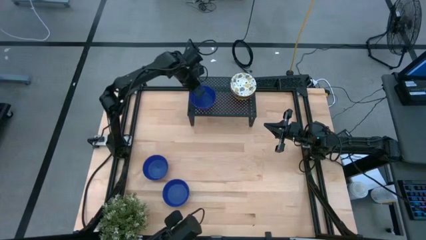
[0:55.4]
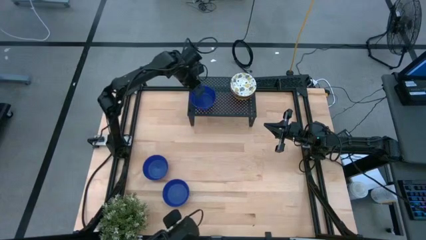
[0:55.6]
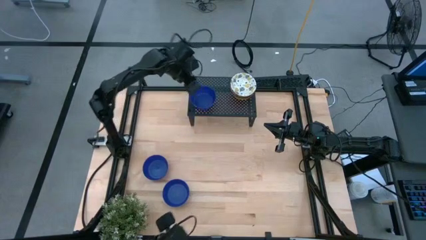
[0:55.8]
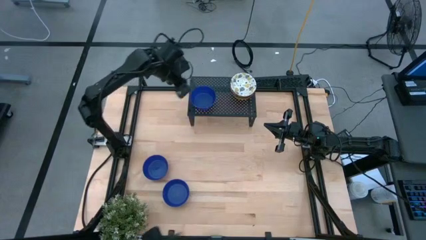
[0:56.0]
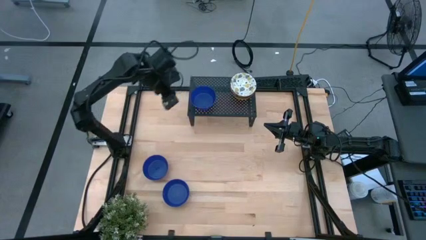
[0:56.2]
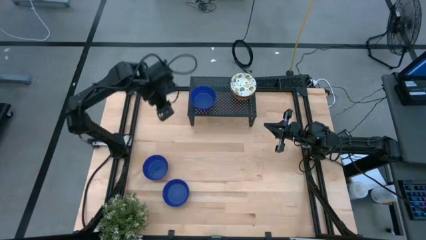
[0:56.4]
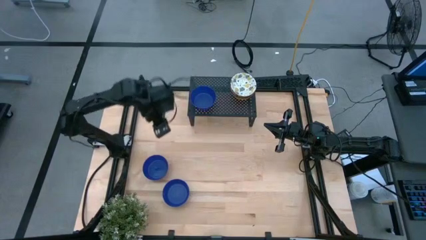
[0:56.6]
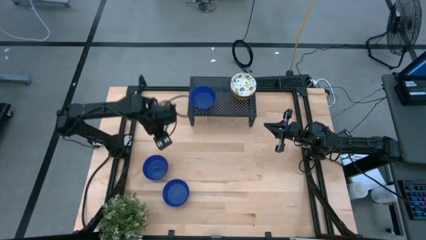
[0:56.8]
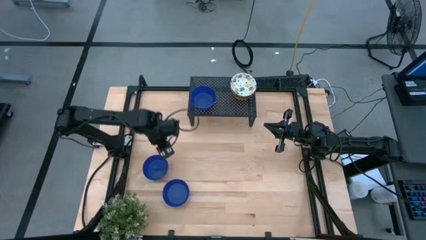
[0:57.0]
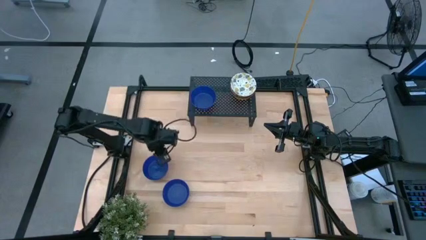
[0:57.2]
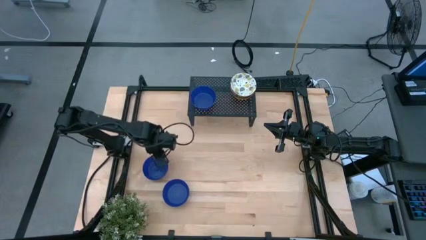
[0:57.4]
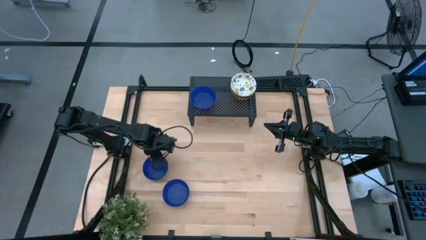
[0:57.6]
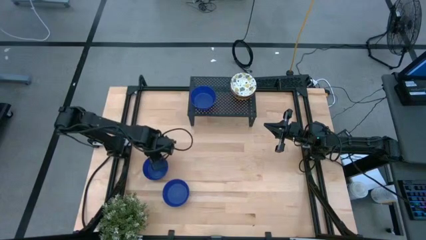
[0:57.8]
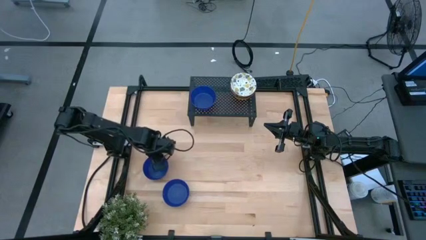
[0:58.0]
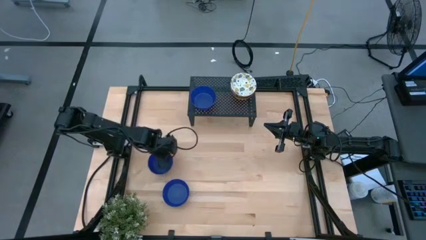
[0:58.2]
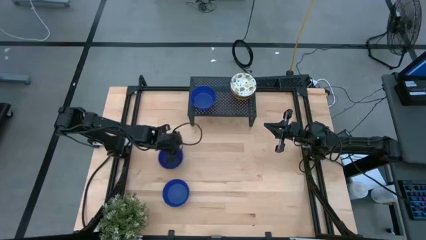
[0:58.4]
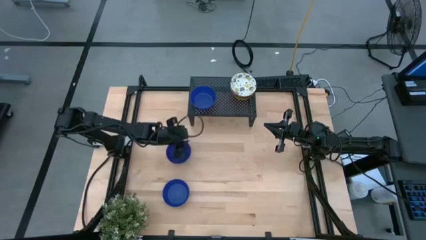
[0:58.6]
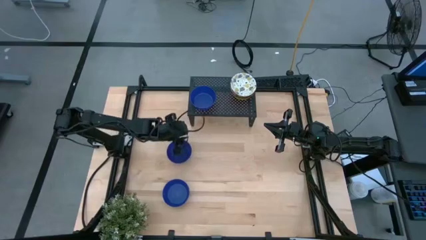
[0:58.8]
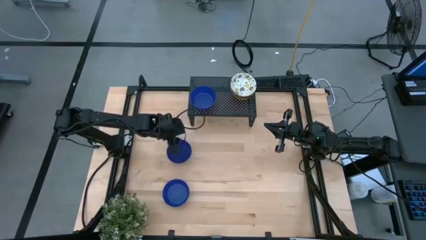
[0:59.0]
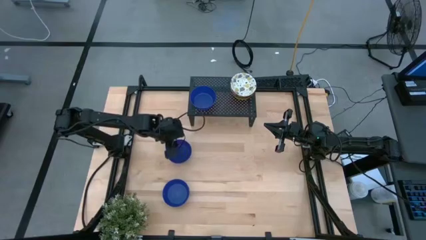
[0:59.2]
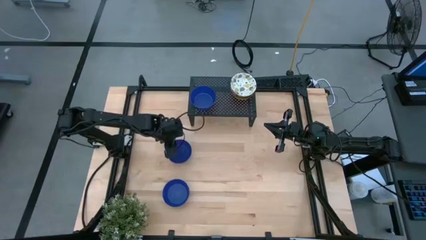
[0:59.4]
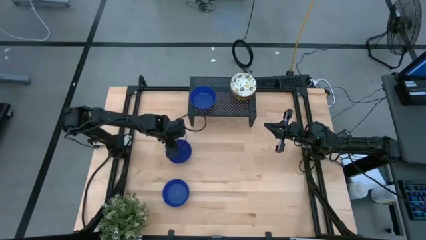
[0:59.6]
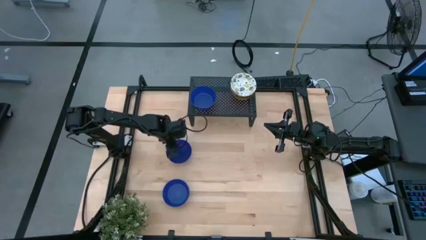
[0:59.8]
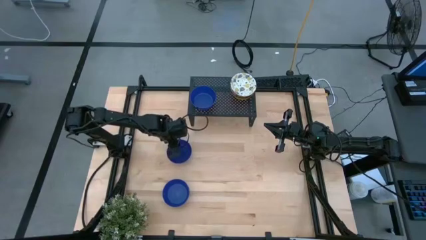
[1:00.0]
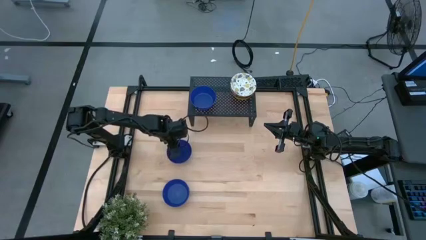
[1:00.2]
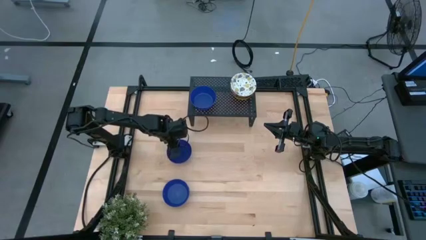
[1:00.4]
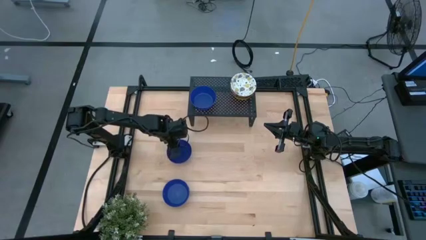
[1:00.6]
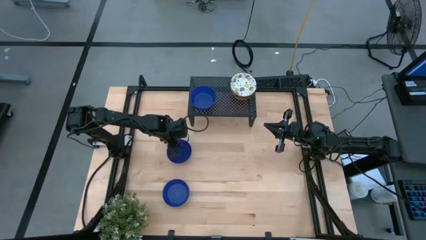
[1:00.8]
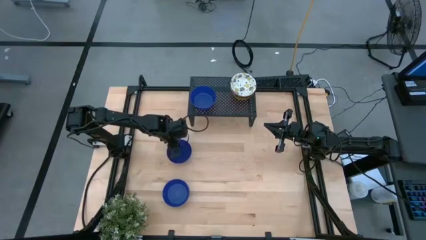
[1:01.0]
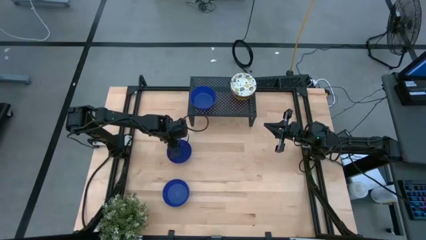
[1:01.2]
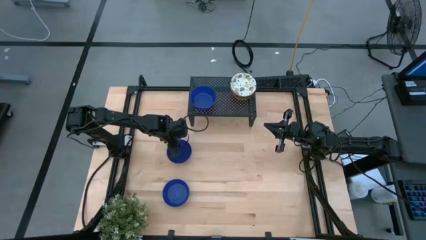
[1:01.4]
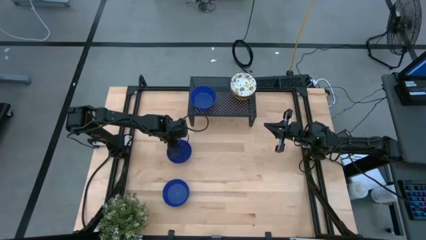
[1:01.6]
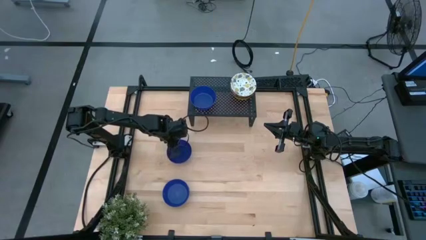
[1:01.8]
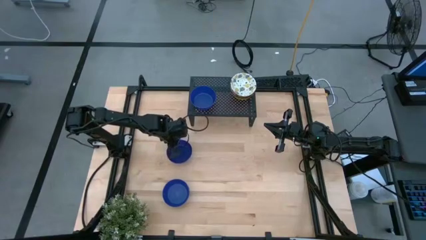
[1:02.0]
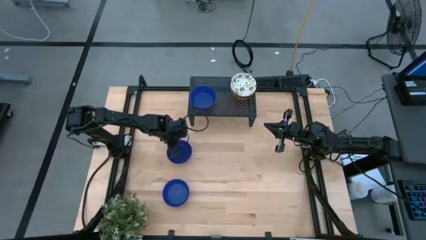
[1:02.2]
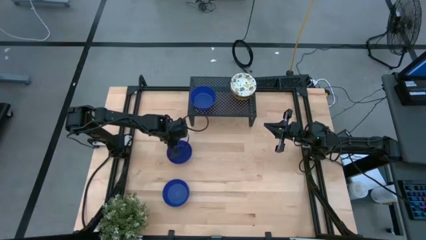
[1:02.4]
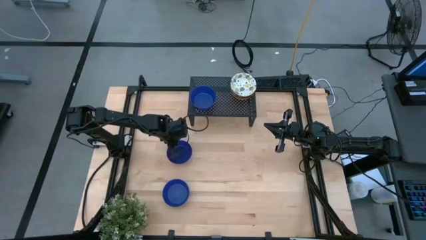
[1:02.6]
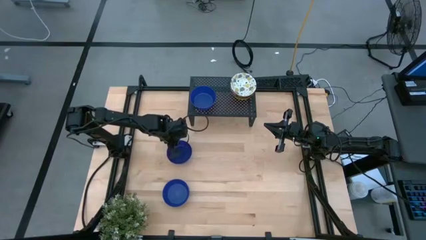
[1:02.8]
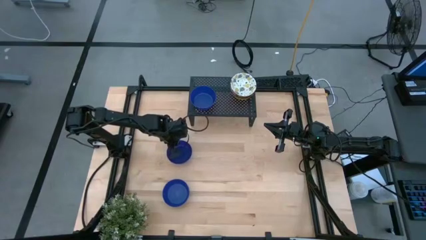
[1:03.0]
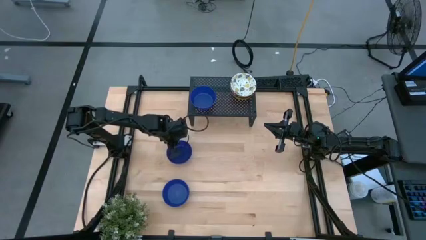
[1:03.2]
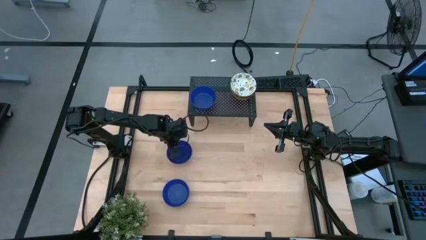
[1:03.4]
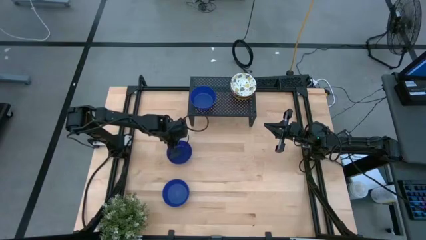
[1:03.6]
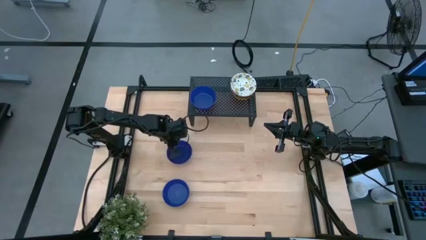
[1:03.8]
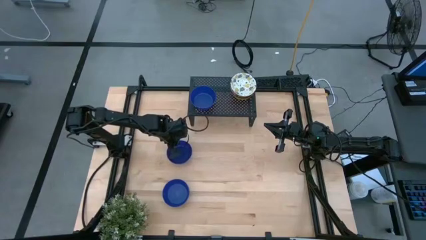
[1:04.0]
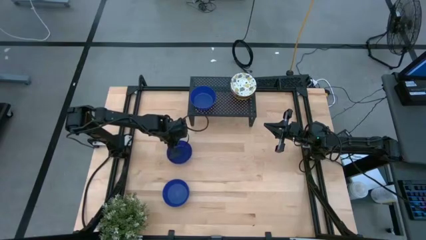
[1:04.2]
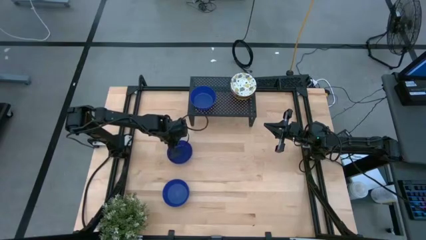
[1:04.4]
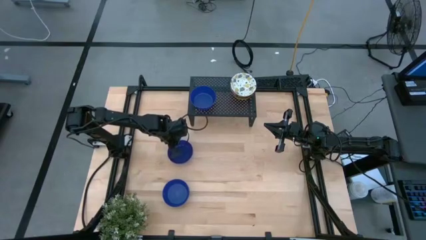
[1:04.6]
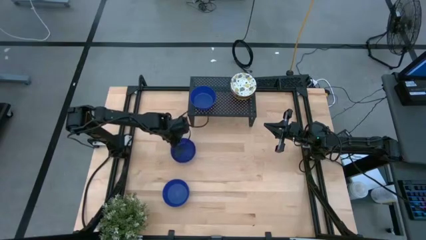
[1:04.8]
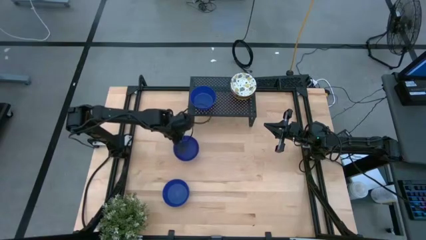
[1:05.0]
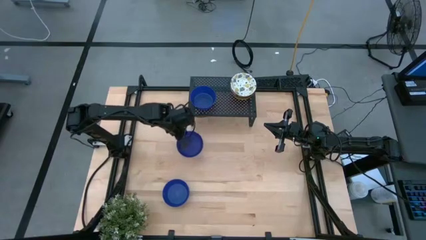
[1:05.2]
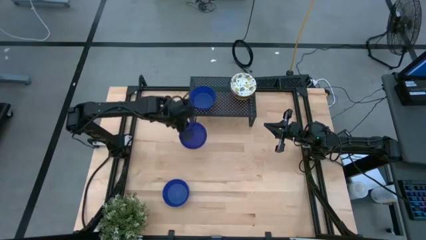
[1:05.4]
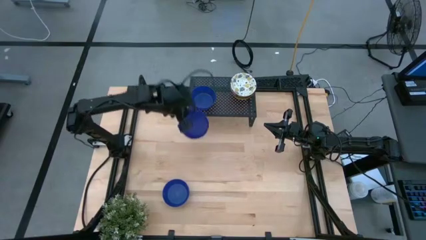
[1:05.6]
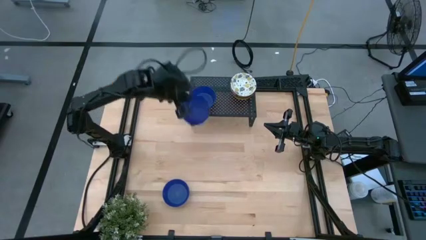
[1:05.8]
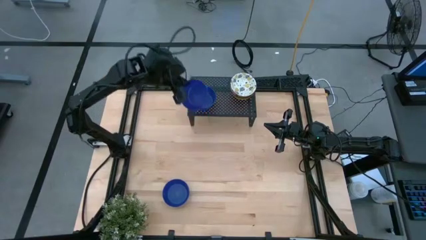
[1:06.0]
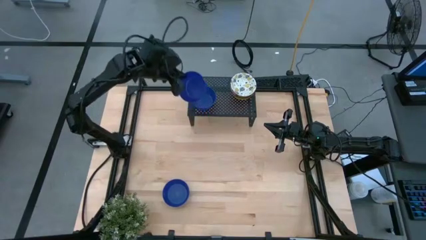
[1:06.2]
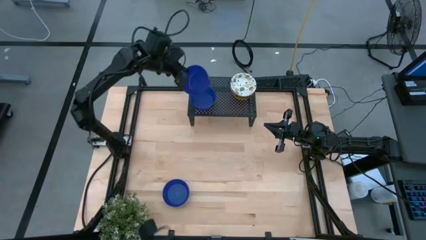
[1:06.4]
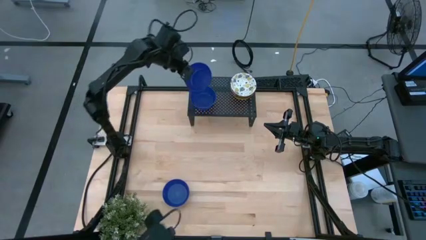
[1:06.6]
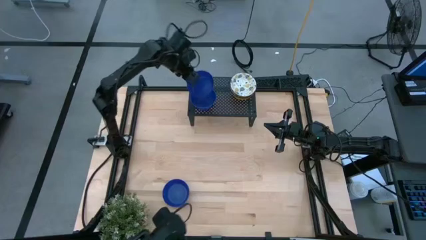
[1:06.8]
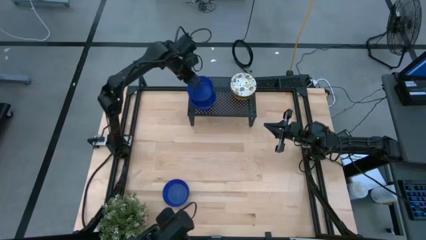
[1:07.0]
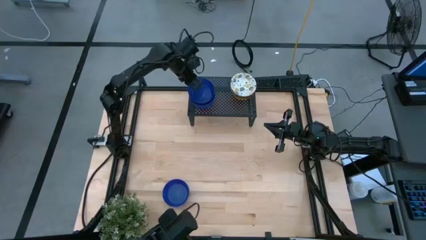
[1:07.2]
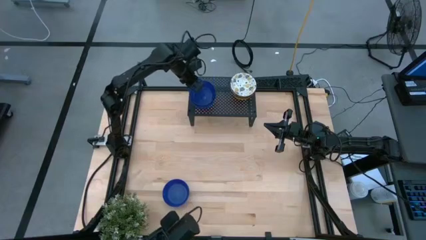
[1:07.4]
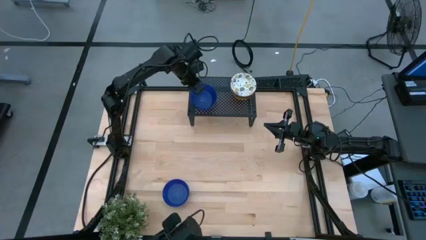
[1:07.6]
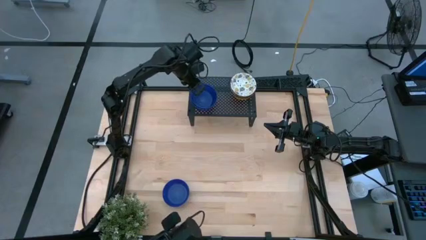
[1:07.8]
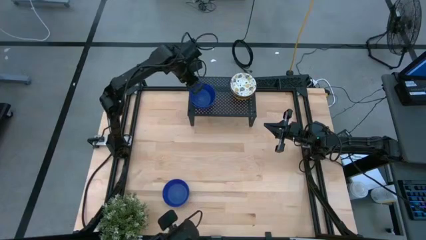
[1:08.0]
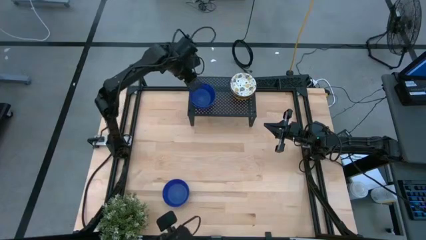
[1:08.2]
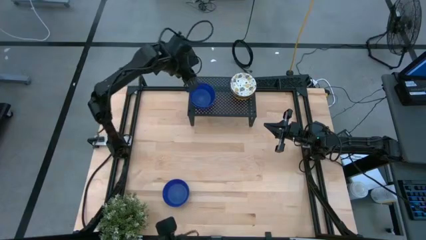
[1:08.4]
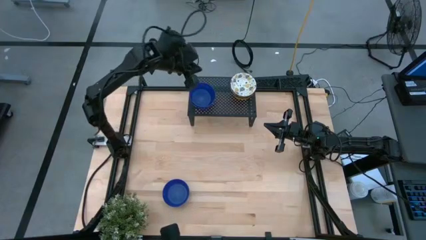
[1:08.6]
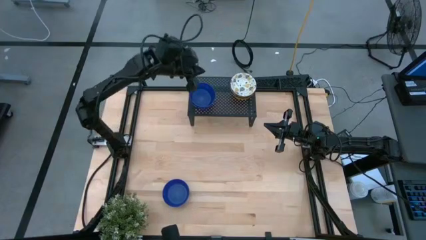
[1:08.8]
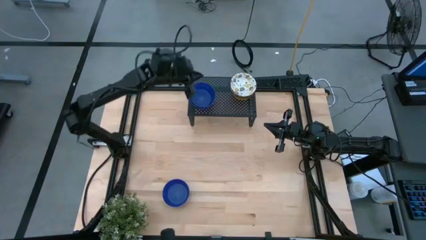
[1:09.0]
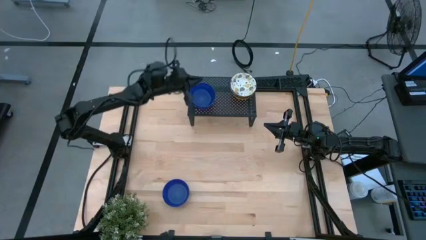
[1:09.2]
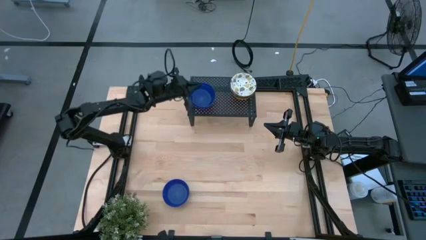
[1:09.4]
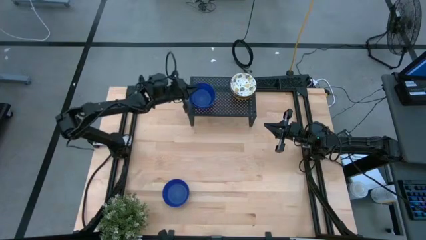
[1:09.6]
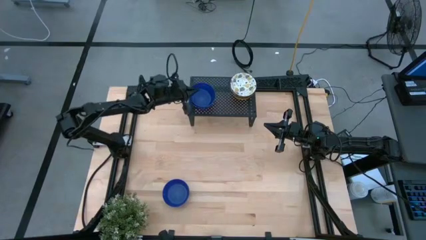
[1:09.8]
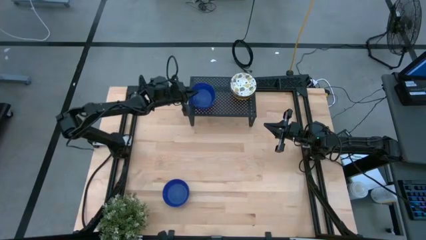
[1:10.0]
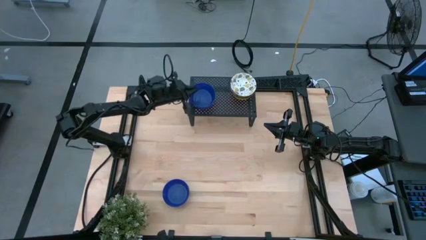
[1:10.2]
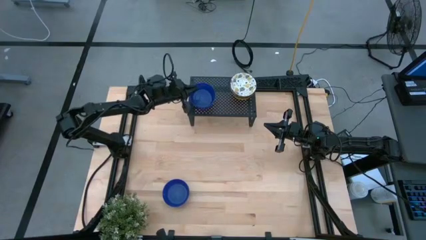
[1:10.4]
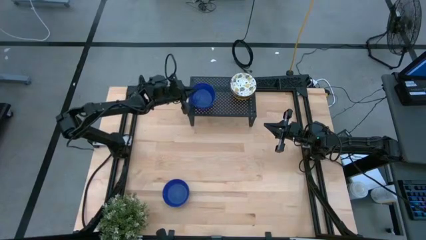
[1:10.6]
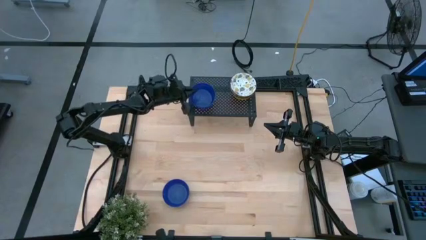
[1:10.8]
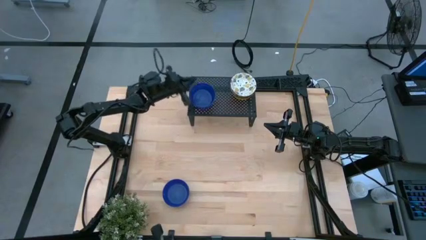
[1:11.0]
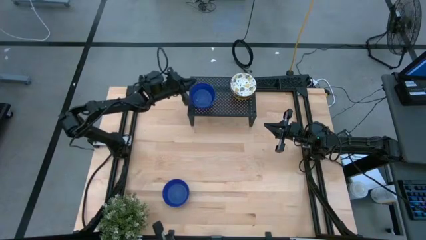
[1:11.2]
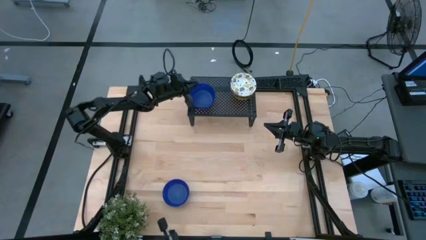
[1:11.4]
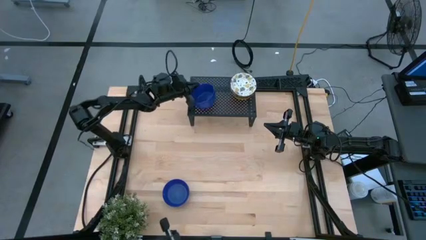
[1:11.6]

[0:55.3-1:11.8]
Task: Pick & Place Mini bowls
Stack the top blue bowl on the blue bowl on the shelf
